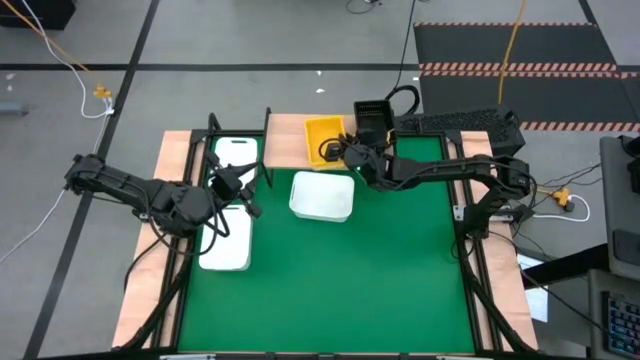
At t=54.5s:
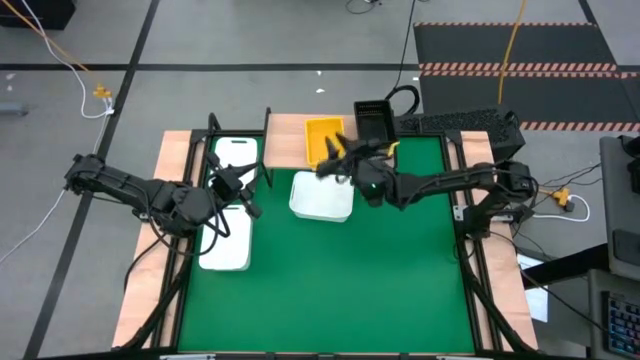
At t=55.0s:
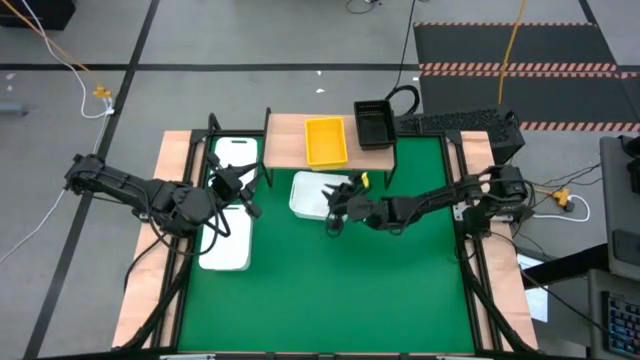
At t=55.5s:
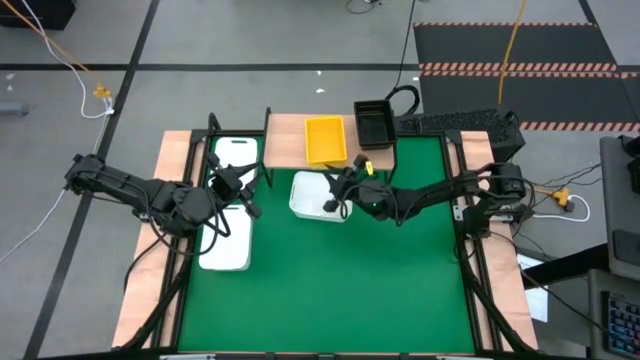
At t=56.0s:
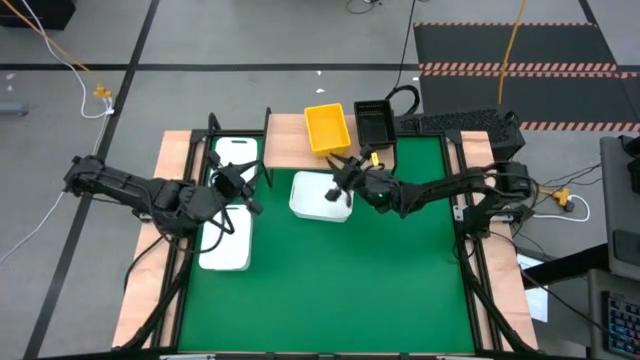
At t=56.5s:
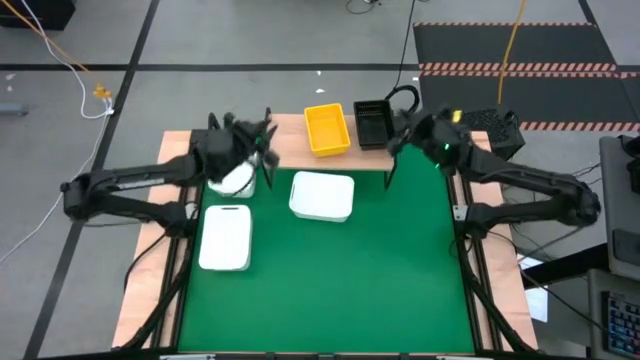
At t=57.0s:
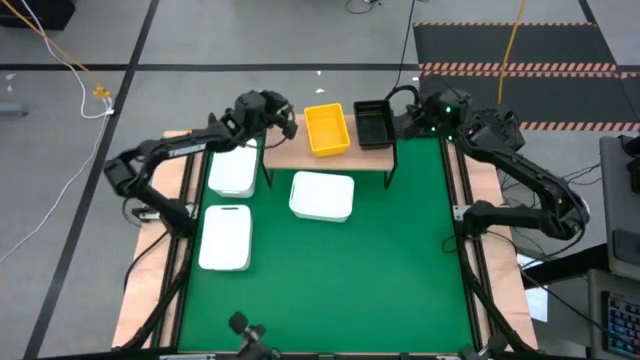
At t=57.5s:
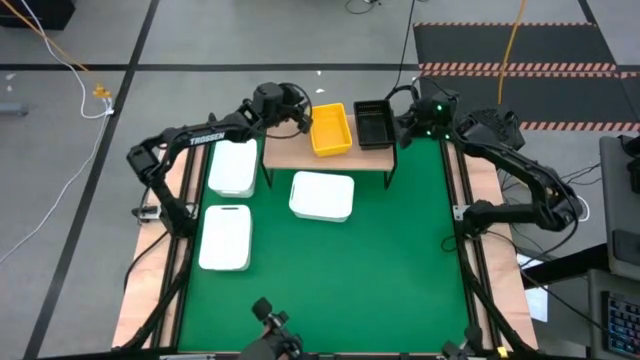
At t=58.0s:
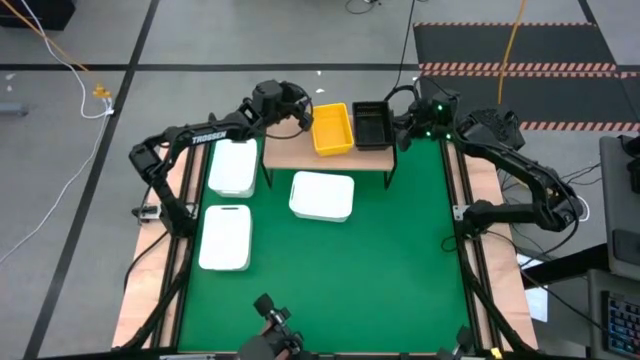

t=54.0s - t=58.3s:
Task: Stack baskets on shelf by color
Adjust the bins on the shelf

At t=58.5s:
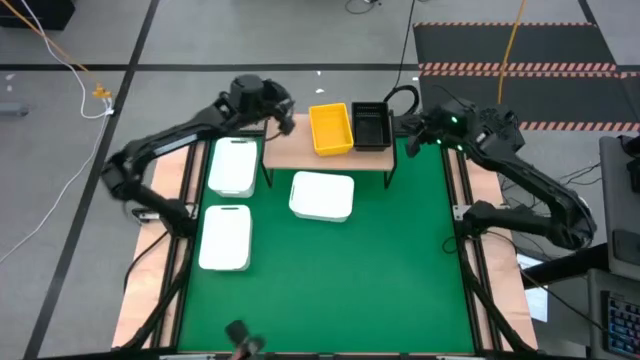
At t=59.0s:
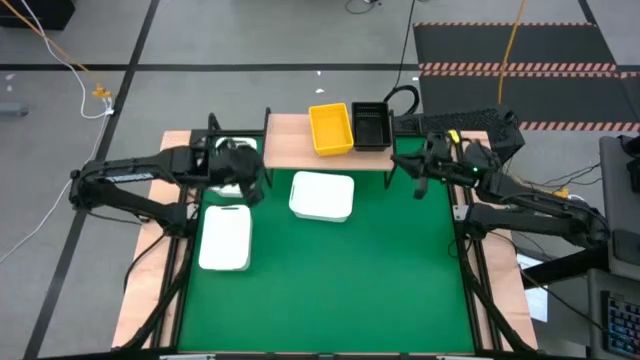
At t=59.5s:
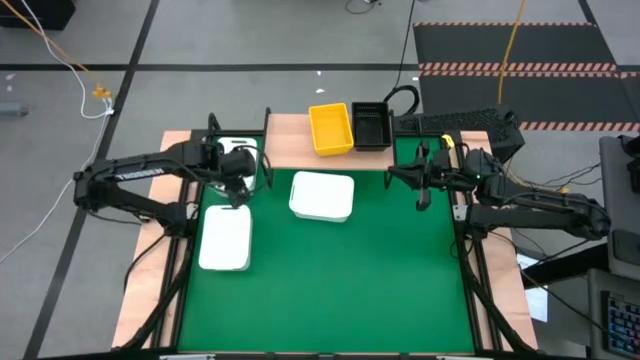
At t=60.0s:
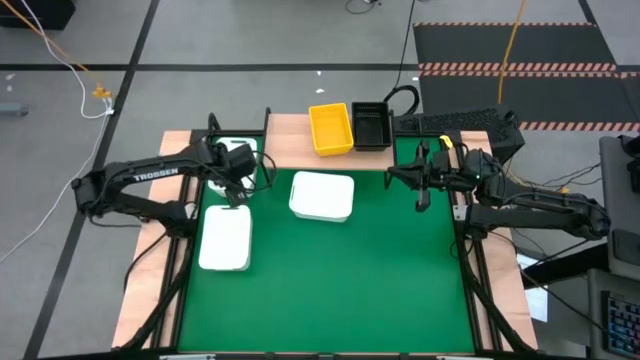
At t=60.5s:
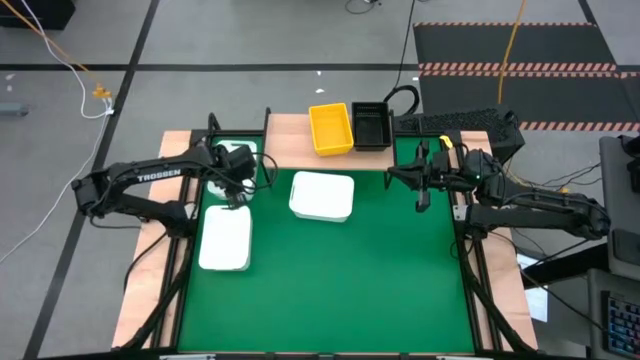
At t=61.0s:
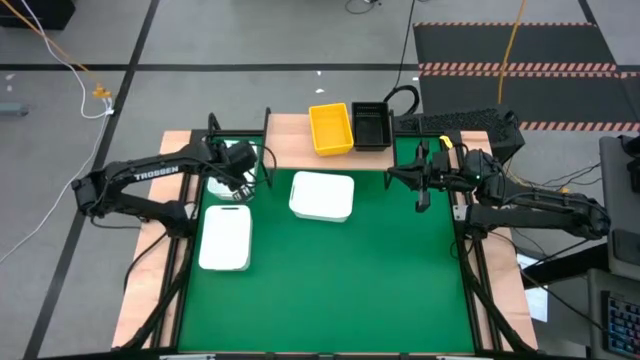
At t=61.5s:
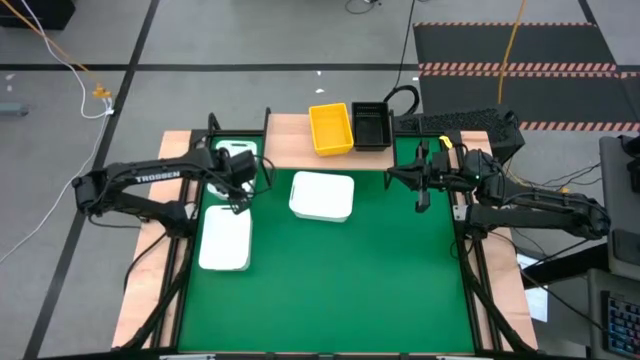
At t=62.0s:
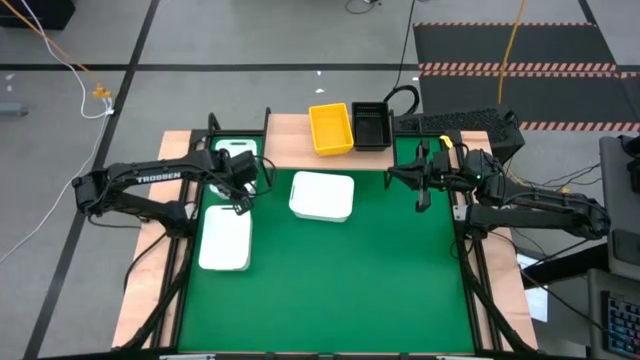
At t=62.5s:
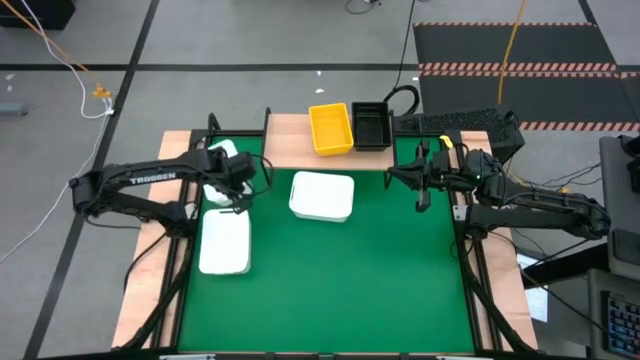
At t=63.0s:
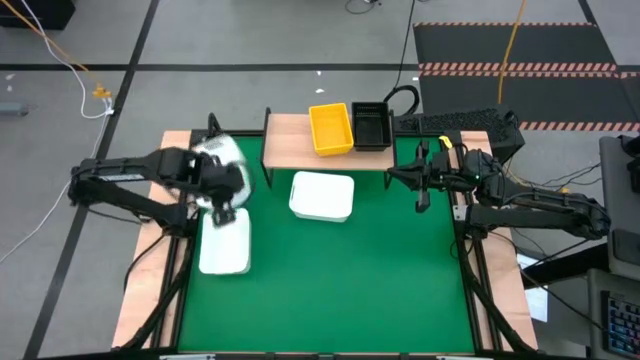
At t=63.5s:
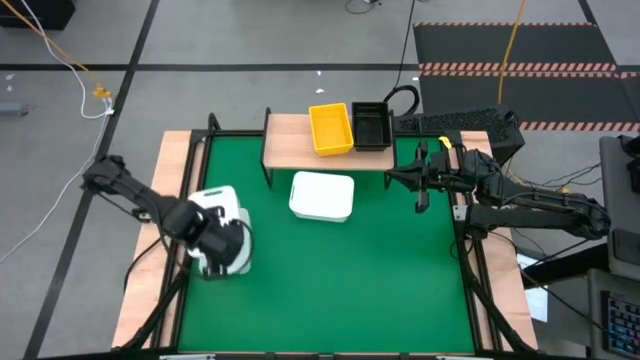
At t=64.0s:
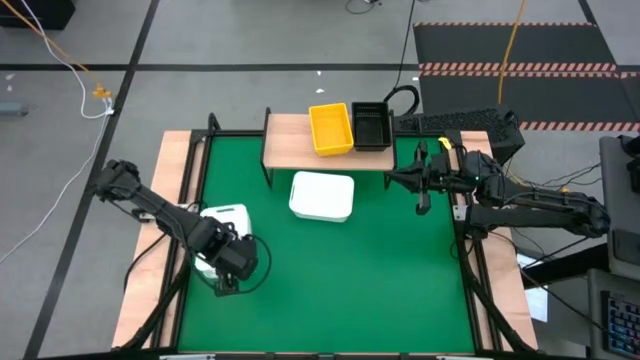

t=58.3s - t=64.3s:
Stack the top white bin on the bottom white bin

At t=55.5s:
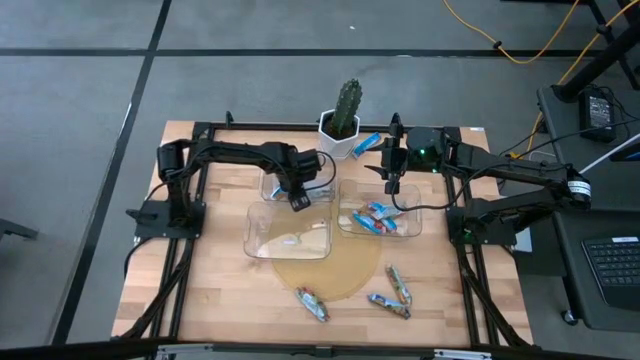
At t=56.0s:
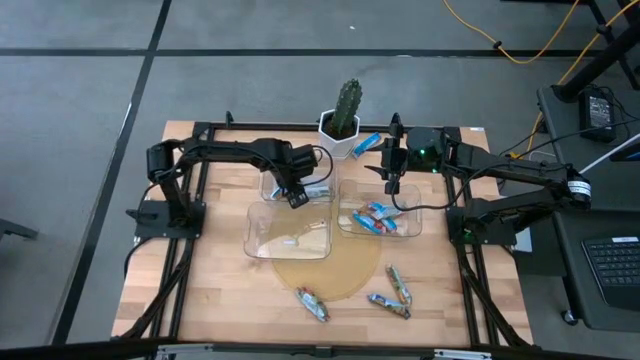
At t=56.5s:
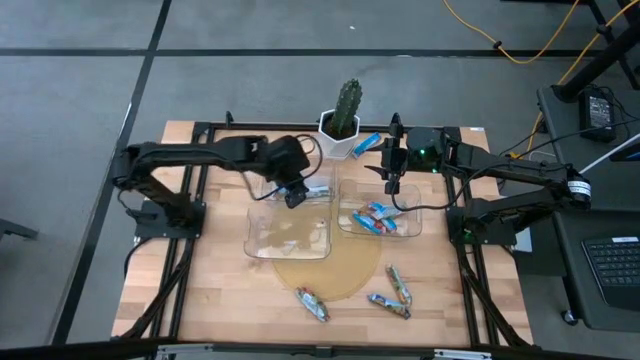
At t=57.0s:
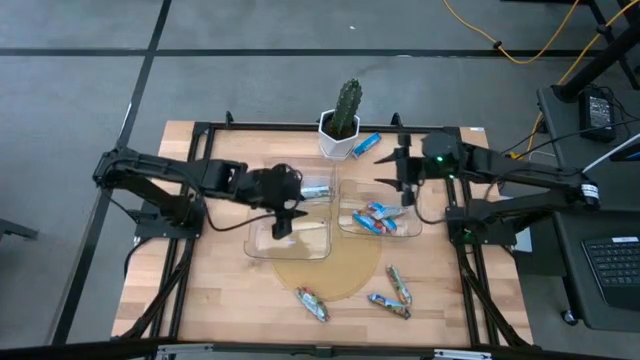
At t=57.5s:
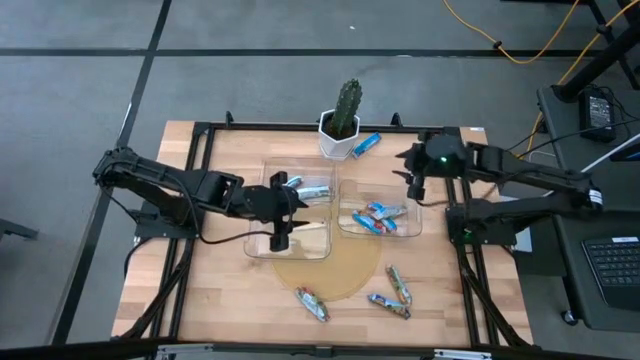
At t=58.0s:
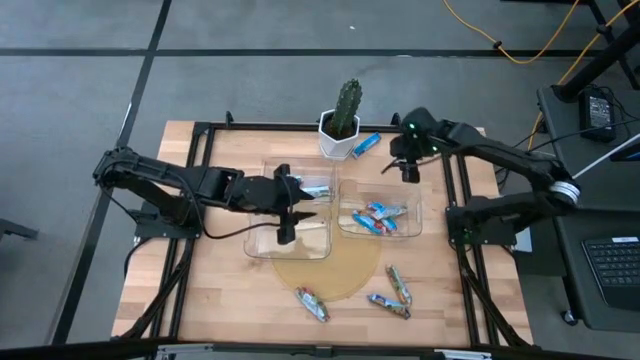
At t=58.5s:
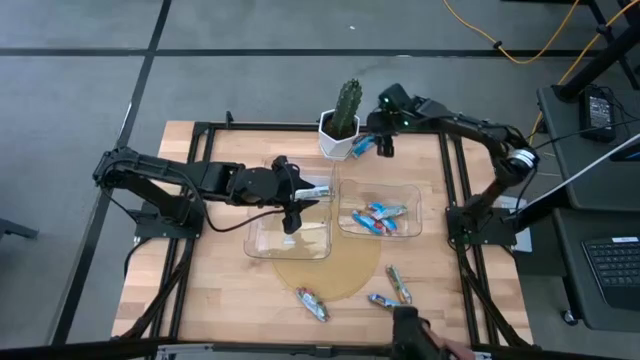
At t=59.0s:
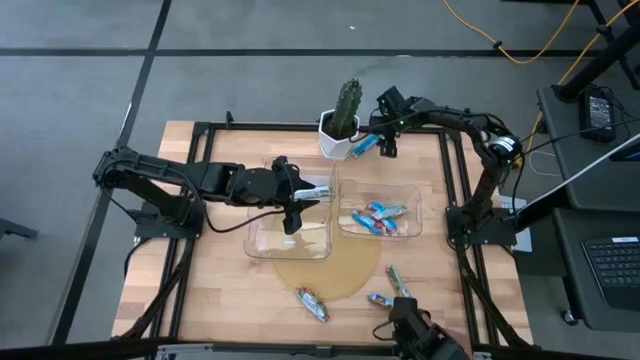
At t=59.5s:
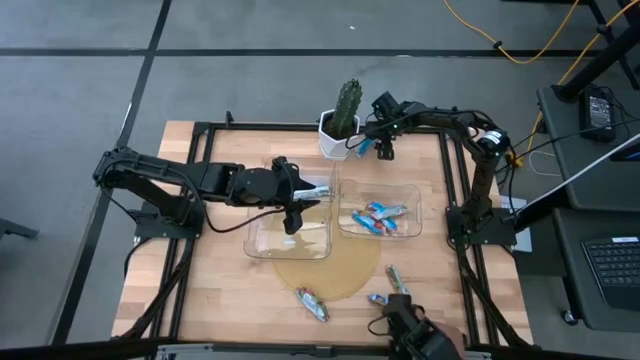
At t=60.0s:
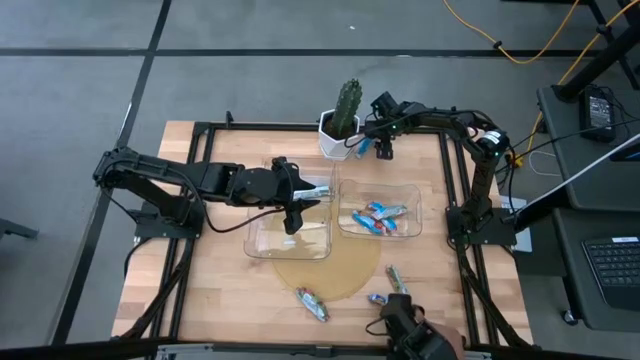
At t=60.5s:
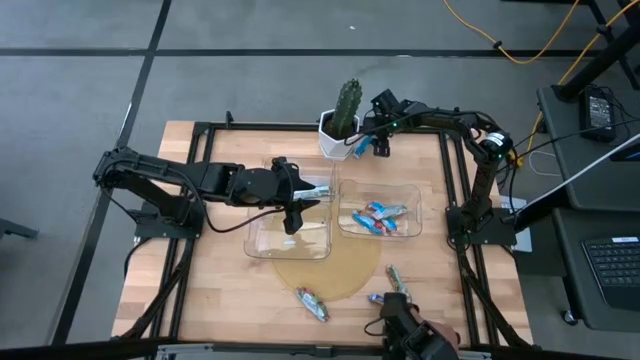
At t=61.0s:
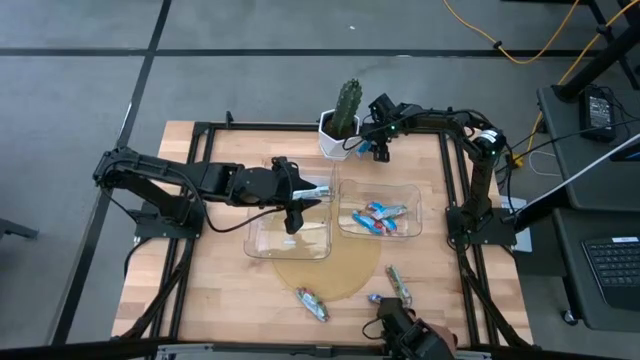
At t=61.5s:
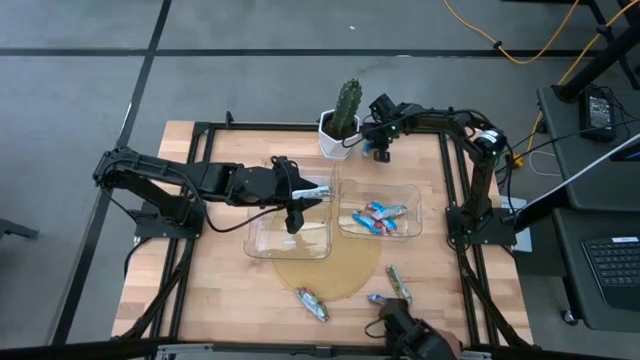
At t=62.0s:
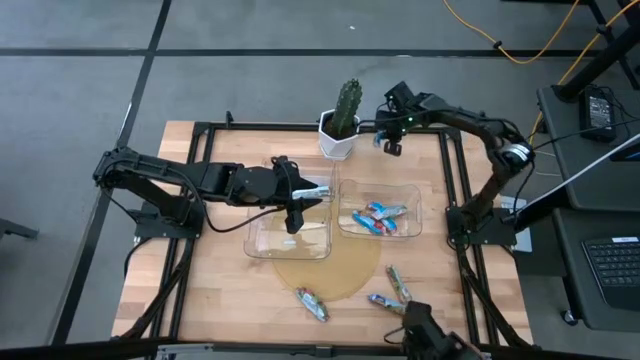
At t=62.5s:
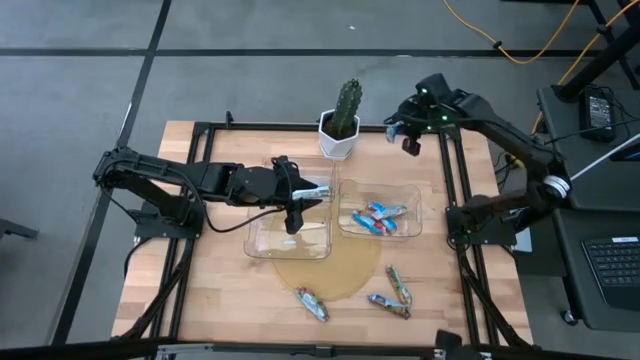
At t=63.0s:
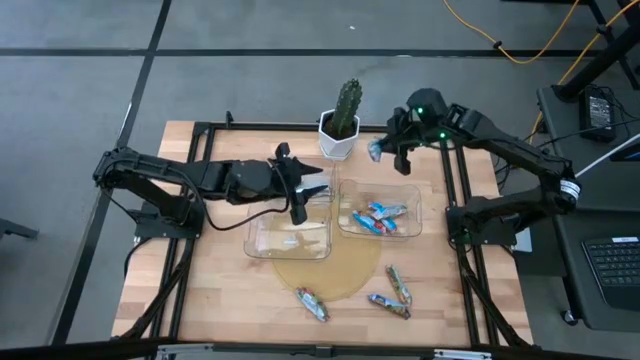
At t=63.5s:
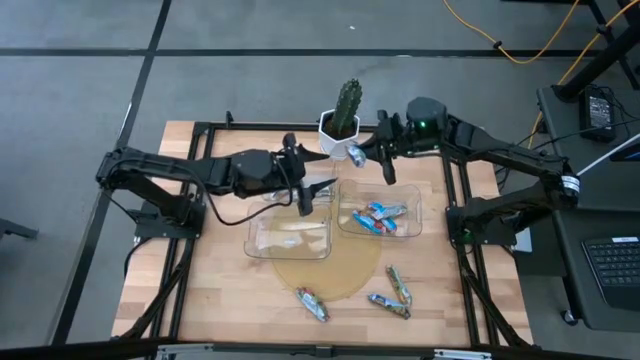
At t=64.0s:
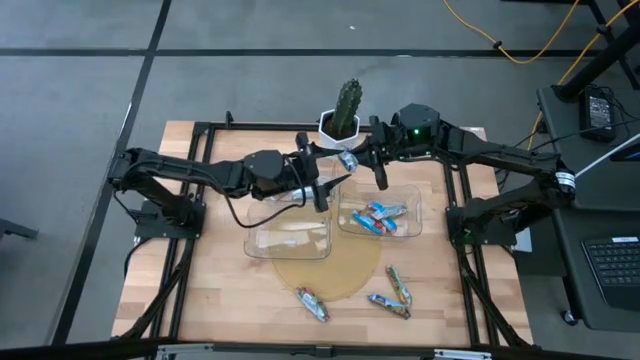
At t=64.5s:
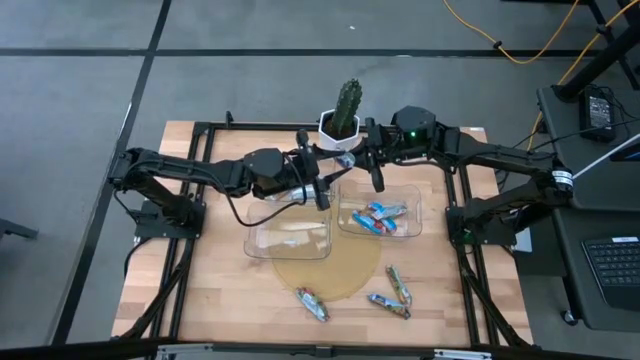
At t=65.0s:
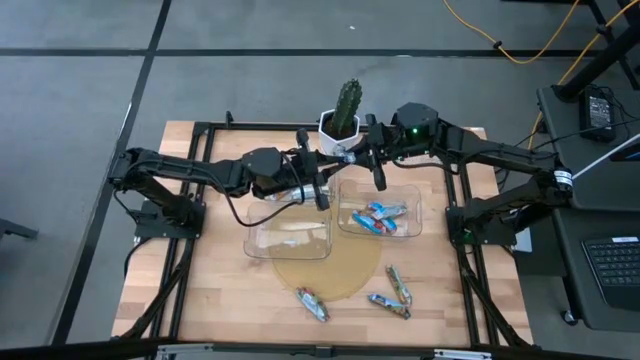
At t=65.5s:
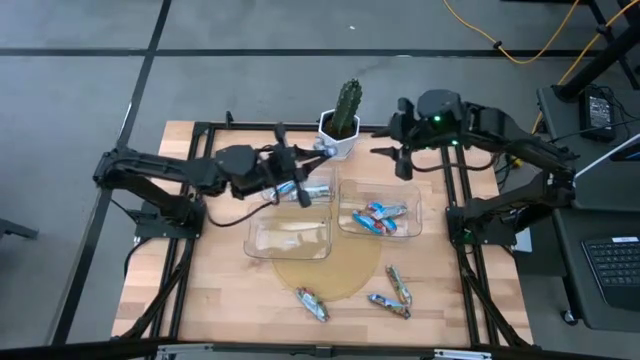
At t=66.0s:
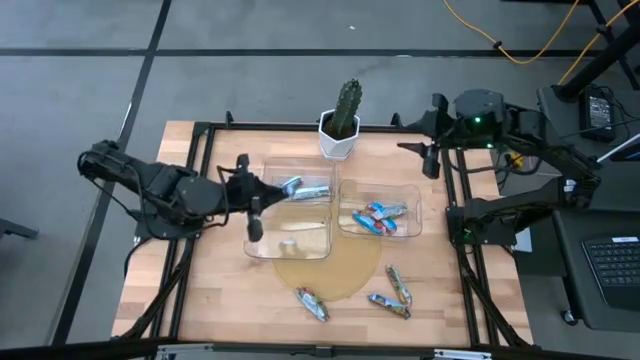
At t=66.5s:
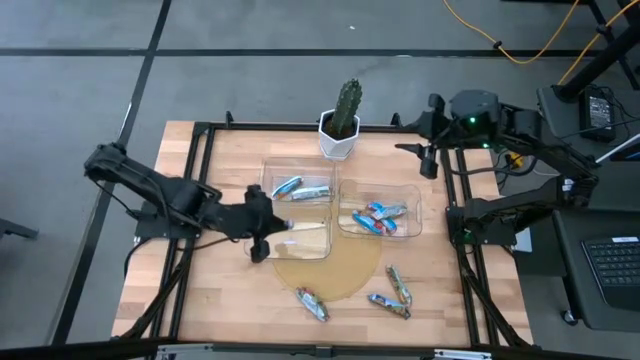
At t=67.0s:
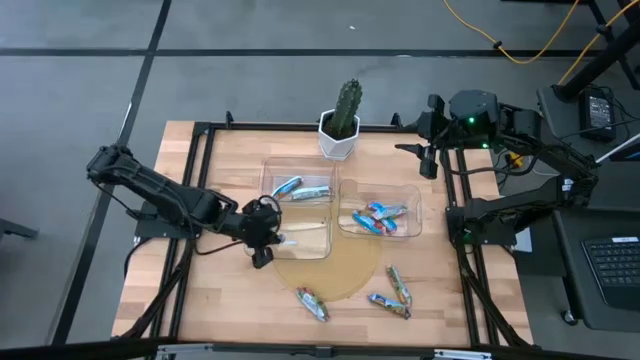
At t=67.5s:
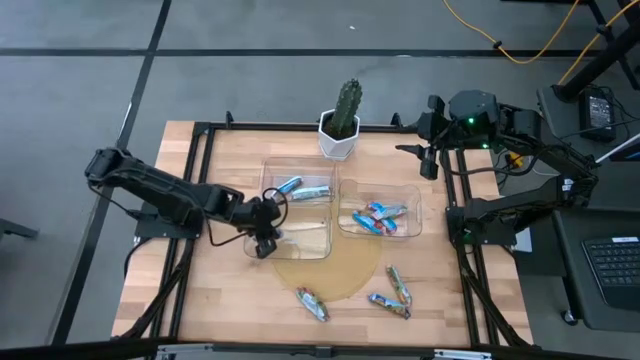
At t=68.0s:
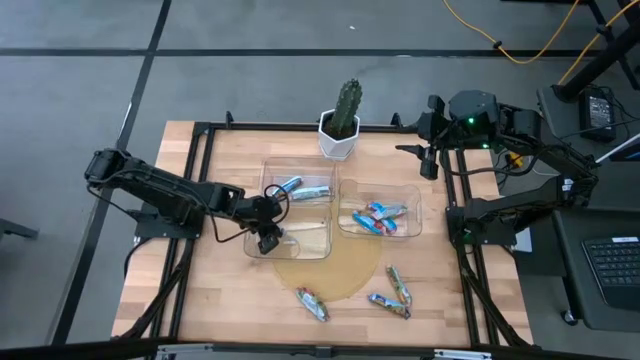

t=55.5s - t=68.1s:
Task: Pick and place Granola Bars by type
Put the top blue granola bar into the bottom bin
